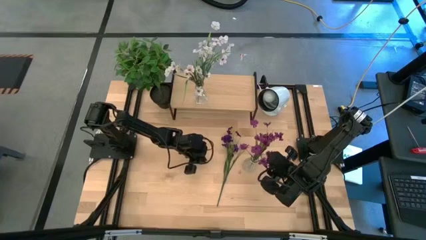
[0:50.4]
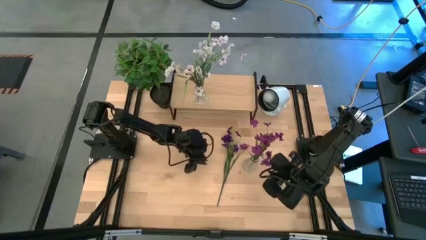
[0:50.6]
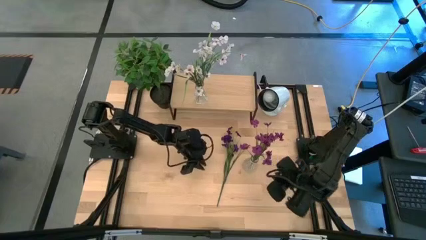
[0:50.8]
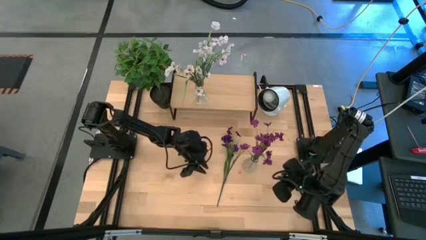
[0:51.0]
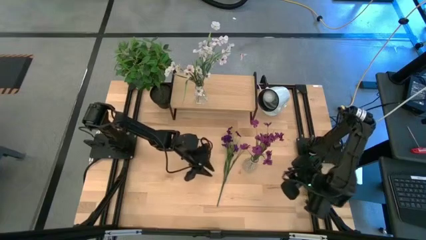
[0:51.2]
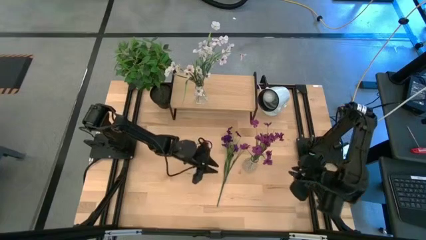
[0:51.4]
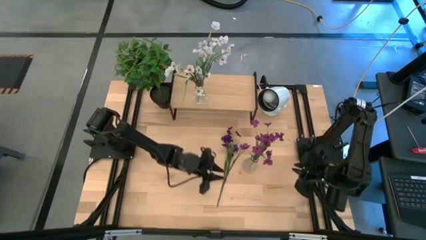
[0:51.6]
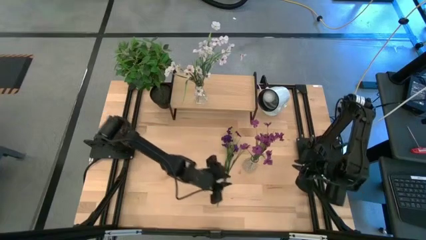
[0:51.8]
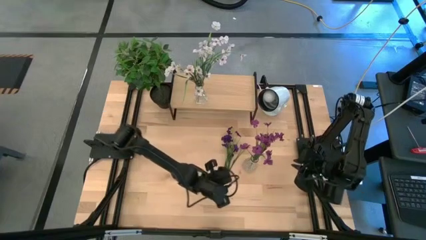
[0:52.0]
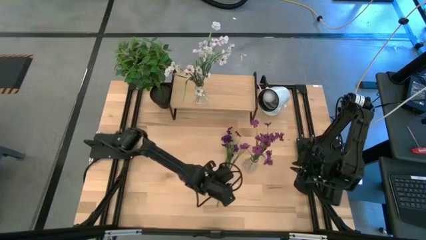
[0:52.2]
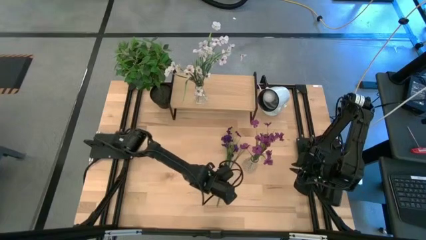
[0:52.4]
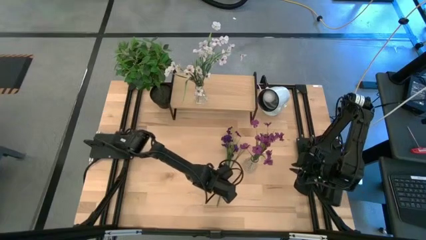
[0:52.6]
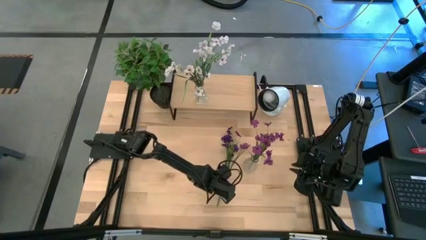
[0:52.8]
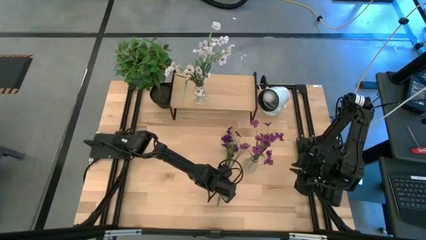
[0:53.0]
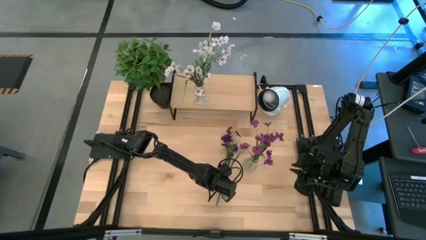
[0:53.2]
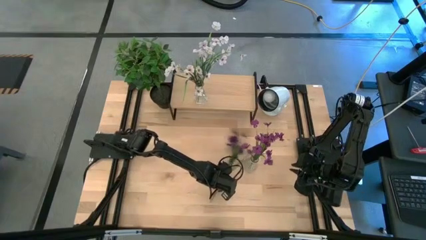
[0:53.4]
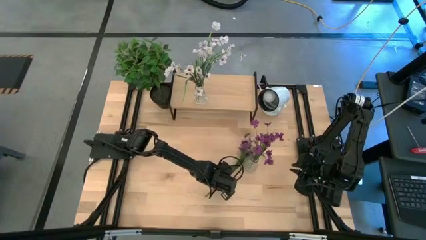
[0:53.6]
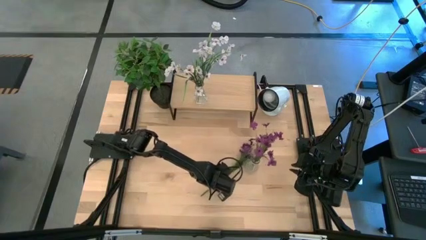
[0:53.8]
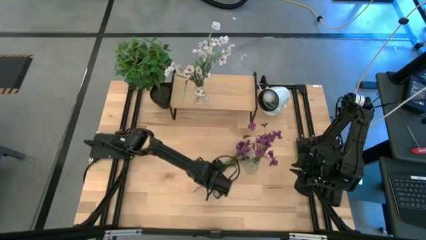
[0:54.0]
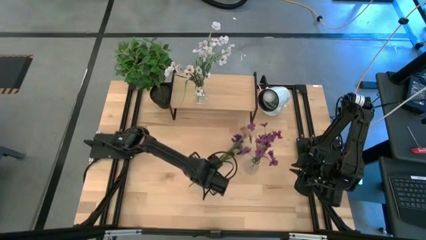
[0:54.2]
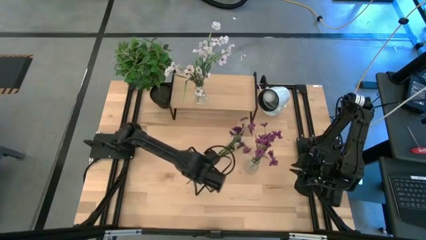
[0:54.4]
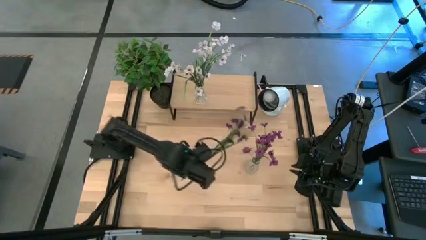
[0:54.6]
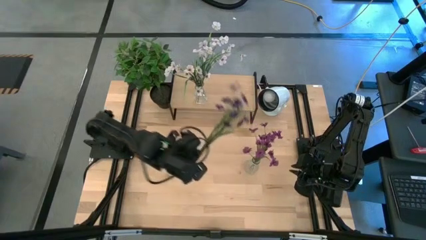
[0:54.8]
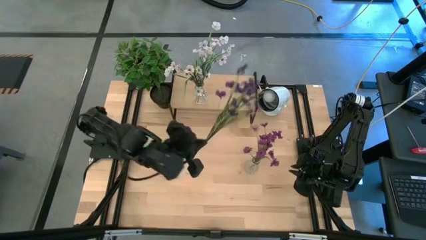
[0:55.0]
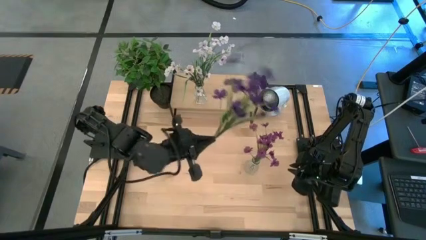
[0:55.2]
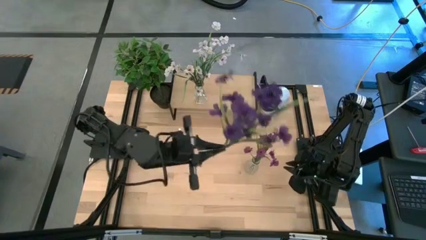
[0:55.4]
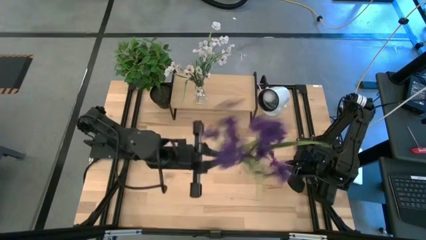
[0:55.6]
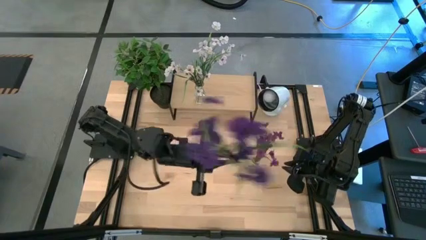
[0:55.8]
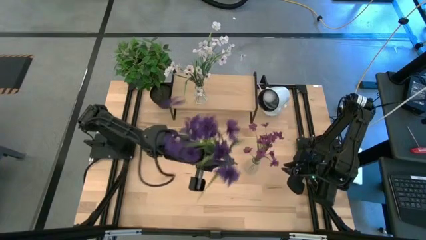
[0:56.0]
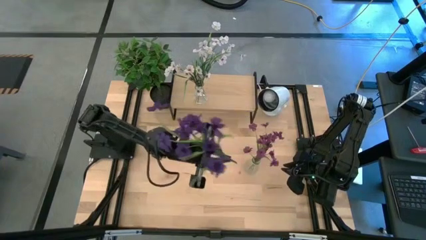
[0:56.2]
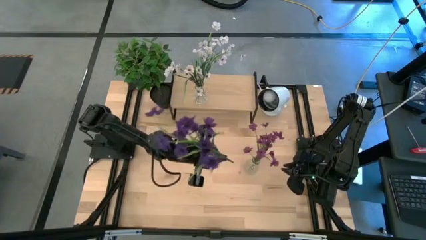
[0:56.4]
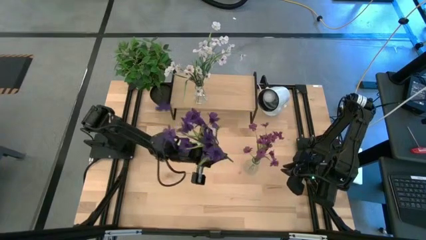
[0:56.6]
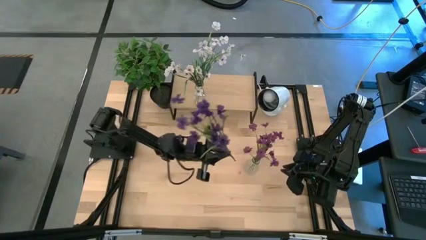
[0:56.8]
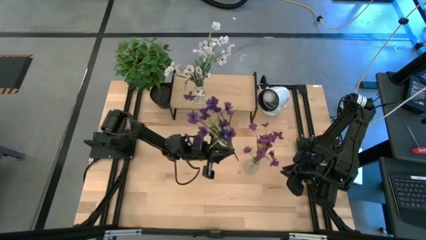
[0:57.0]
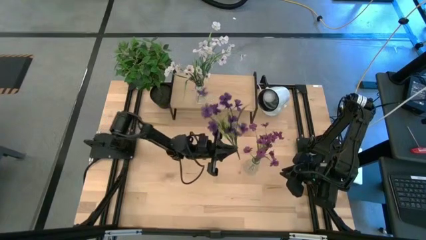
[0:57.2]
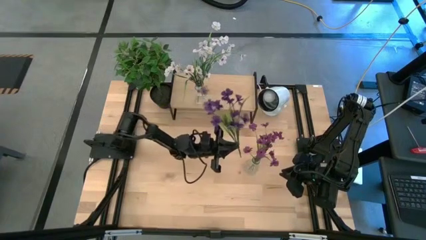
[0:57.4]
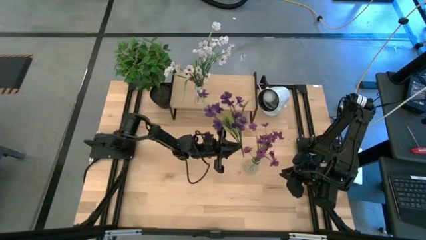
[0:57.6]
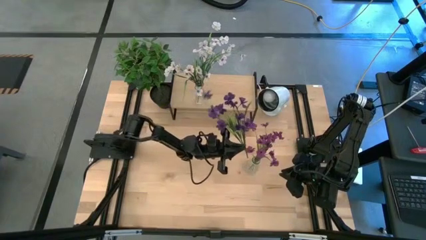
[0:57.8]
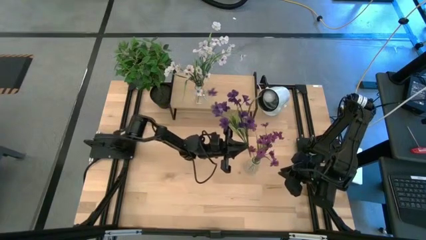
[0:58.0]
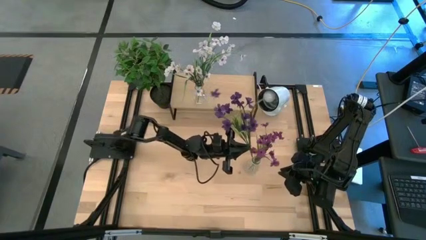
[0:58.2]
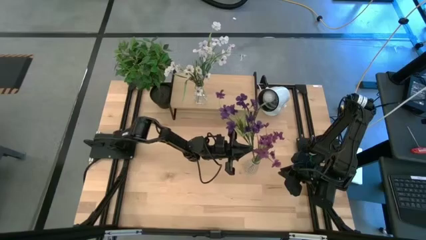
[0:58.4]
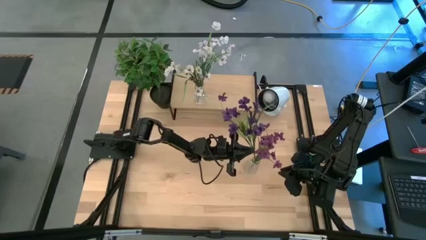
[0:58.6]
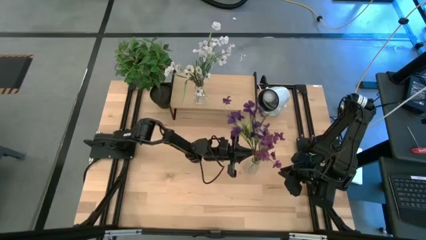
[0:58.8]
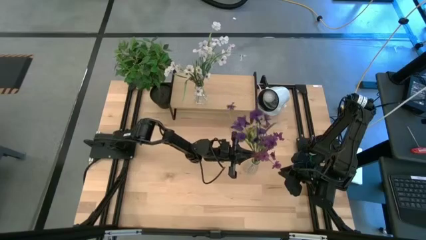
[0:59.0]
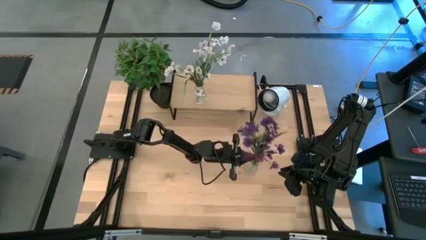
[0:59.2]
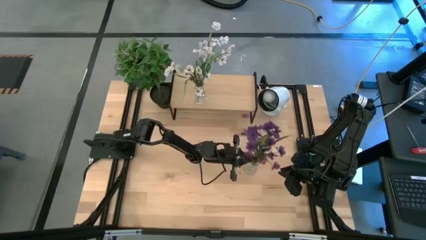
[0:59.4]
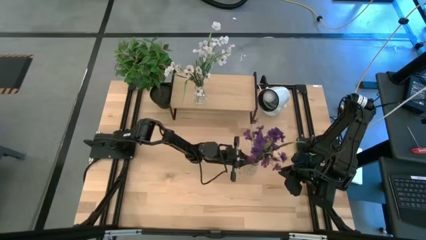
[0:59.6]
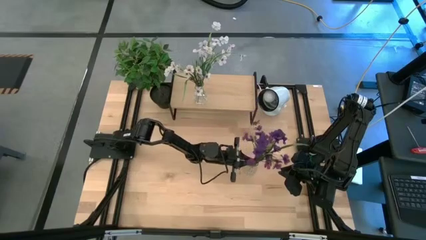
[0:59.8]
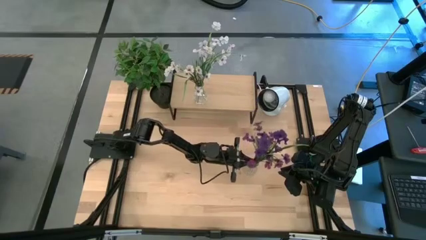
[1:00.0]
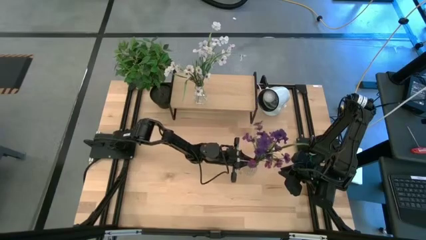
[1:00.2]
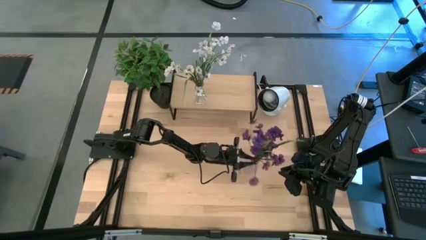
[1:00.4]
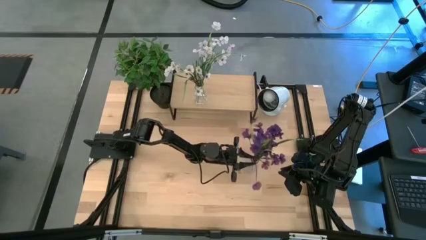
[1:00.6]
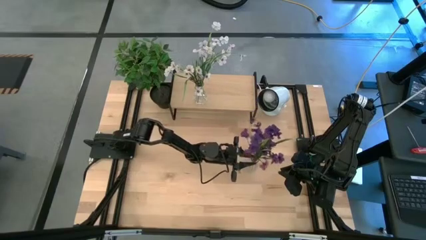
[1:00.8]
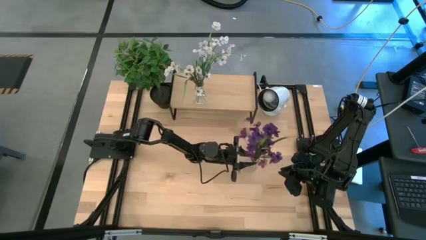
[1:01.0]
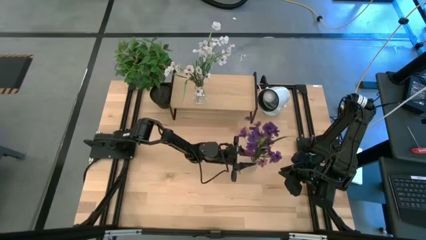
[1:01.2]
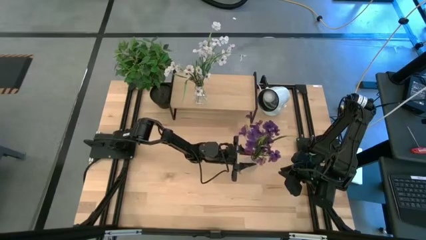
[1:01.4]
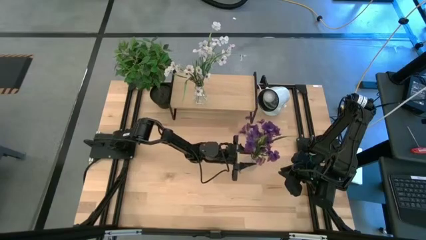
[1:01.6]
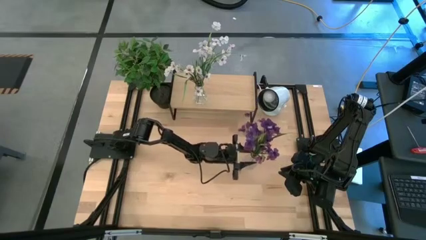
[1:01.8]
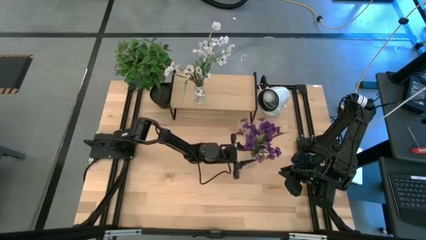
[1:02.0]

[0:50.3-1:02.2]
Task: Pick and place flowers into a vace then onto a shelf
Put the purple flowers into the transparent vase

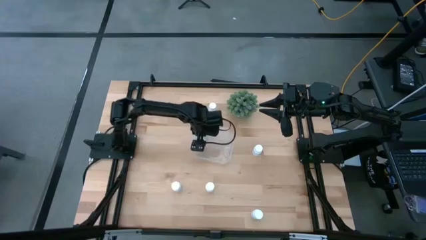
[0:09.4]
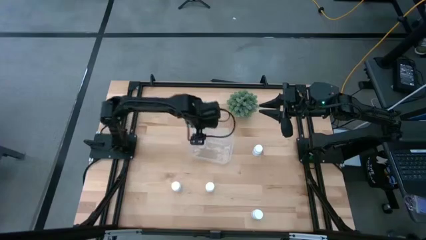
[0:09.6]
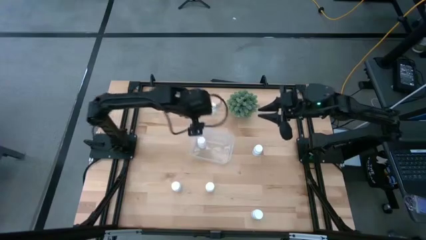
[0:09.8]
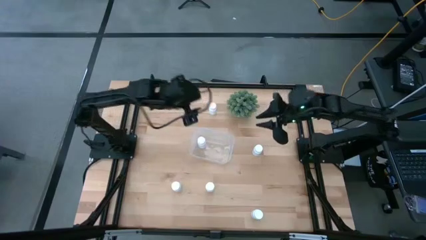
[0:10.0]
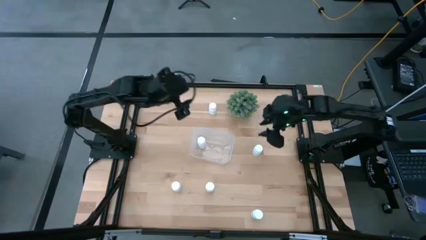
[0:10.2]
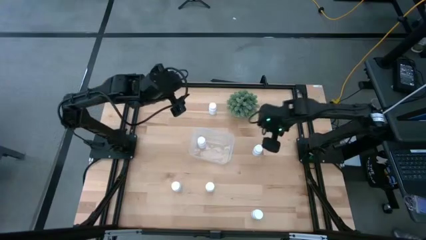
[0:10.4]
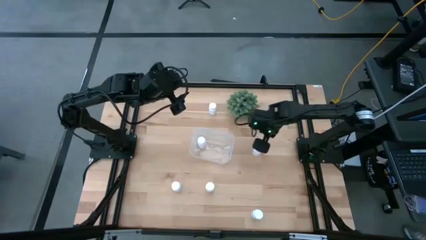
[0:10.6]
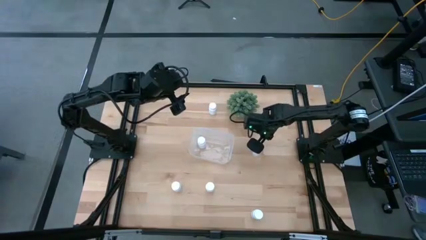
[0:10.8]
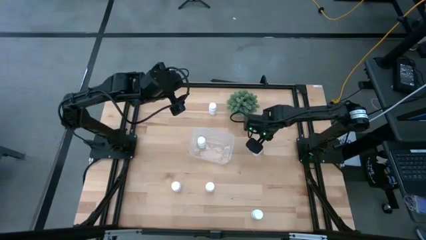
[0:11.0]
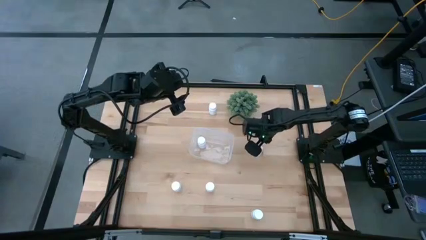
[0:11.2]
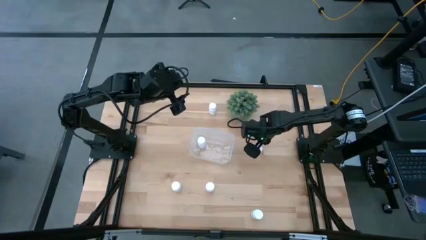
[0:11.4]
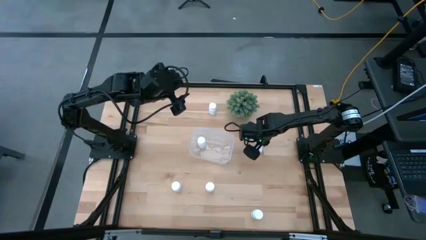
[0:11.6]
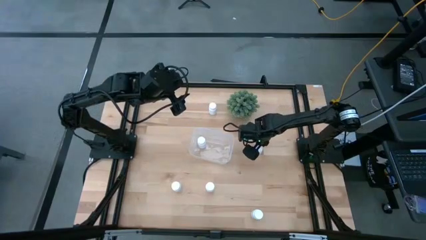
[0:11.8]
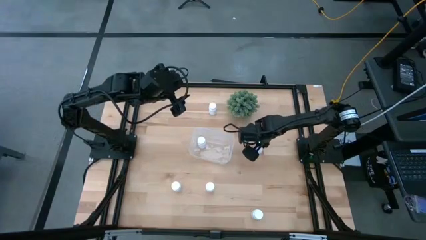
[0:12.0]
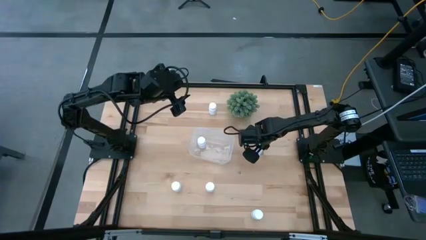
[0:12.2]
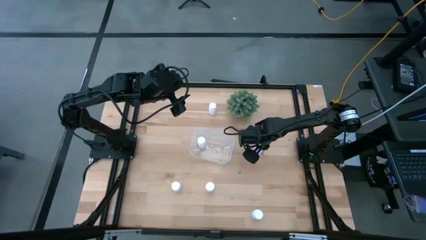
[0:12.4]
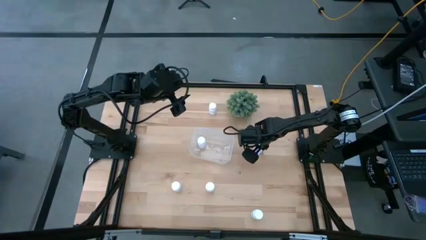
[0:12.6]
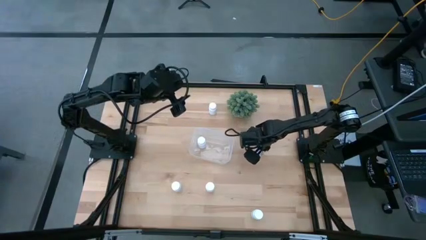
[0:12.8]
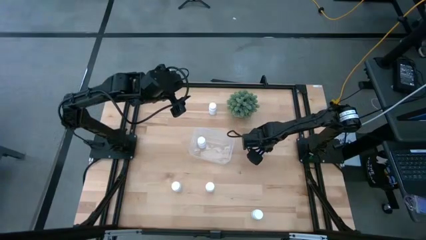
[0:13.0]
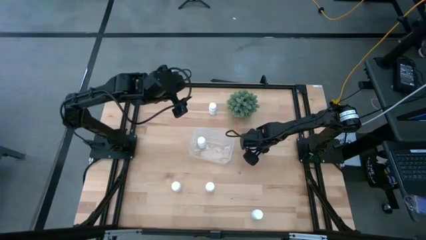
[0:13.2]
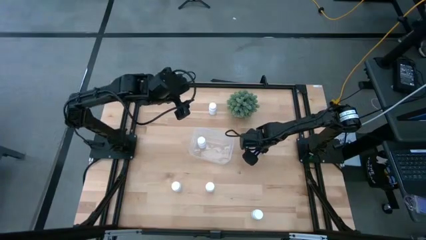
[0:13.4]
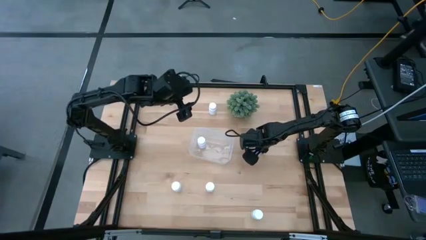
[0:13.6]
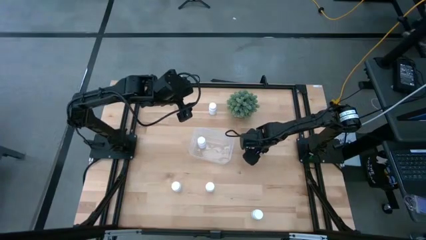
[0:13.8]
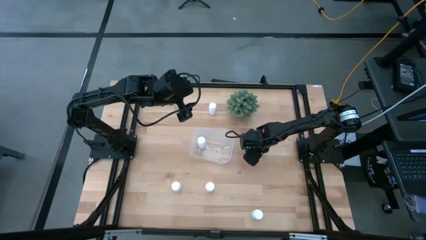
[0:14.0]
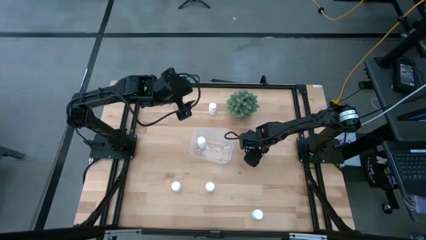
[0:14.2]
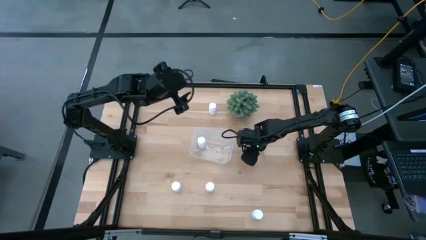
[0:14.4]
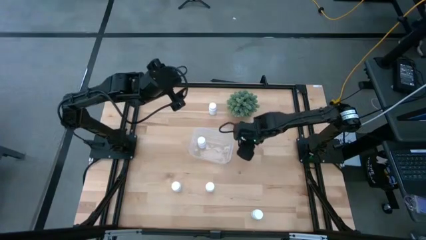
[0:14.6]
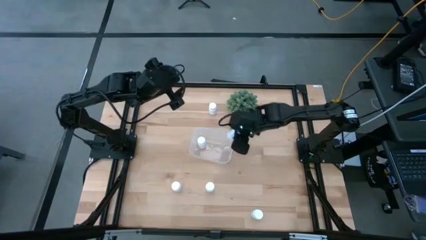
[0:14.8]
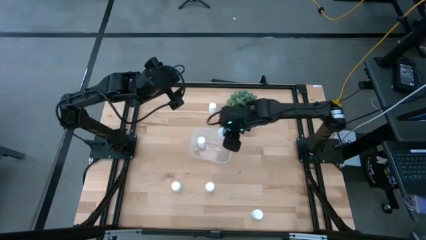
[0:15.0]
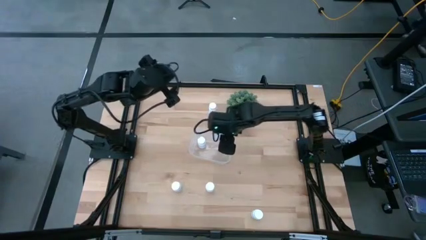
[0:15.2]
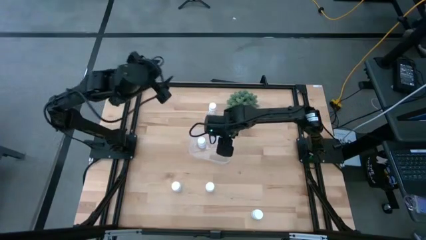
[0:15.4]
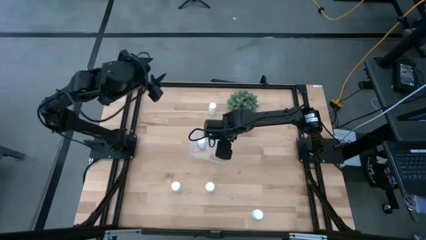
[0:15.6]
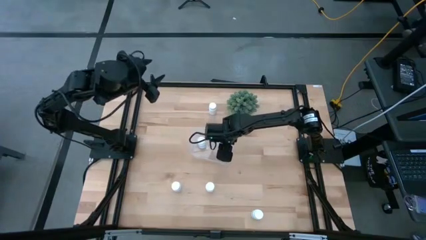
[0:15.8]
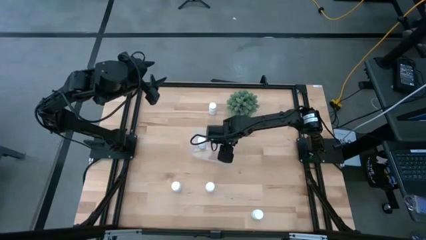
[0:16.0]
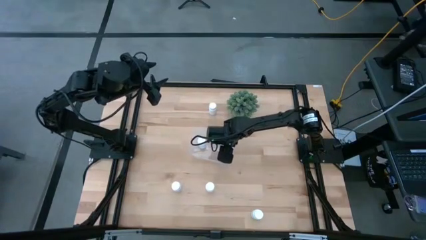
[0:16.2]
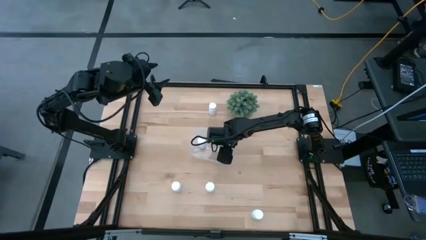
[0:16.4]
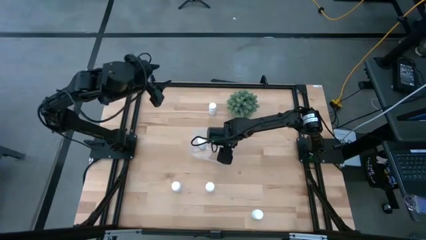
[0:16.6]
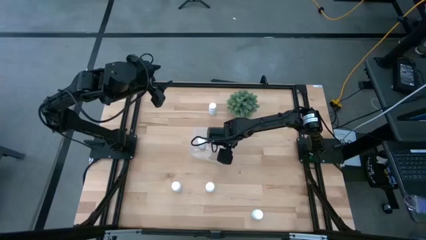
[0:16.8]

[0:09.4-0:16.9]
Task: Pick and place pill bottles into a basket
Put the white pill bottle into the transparent bin
